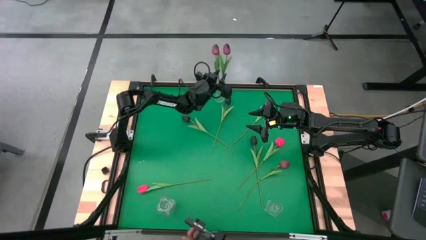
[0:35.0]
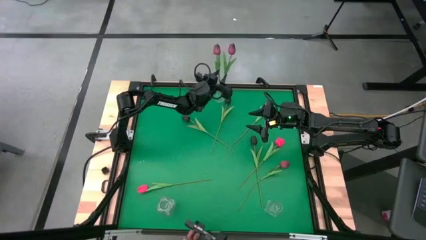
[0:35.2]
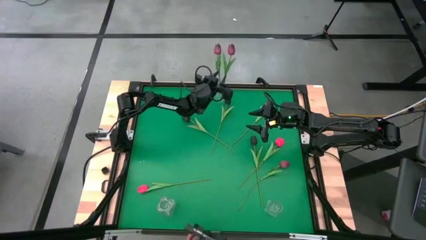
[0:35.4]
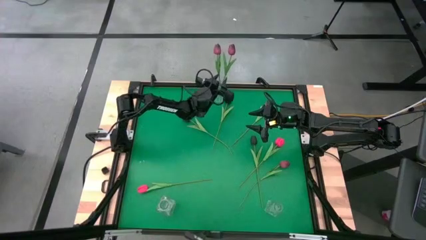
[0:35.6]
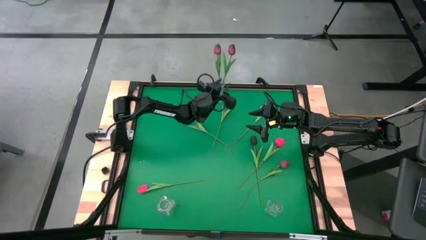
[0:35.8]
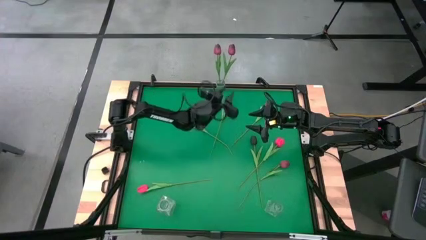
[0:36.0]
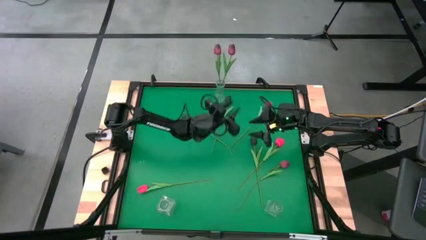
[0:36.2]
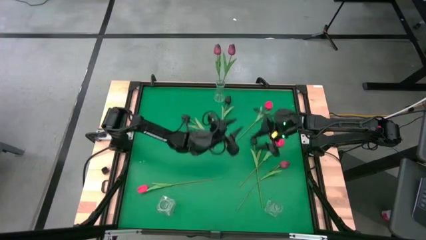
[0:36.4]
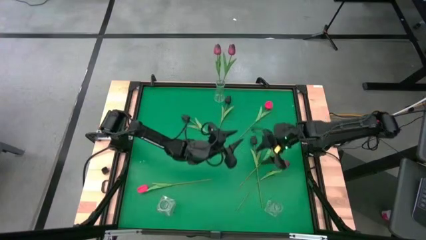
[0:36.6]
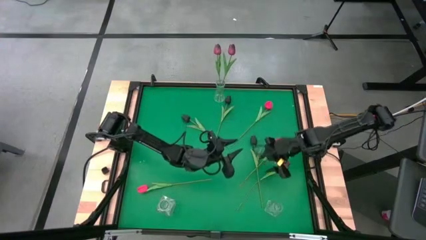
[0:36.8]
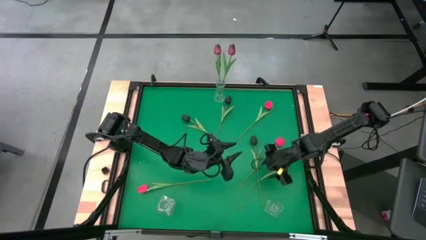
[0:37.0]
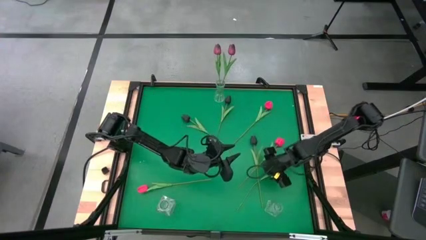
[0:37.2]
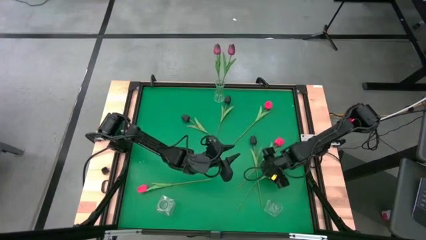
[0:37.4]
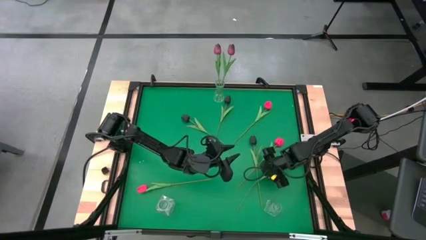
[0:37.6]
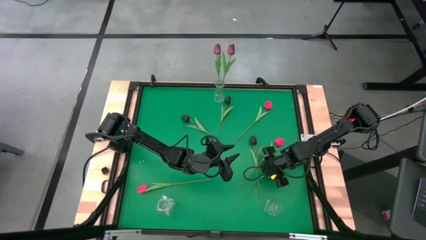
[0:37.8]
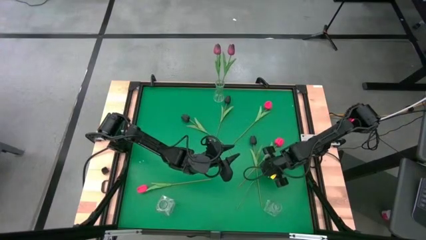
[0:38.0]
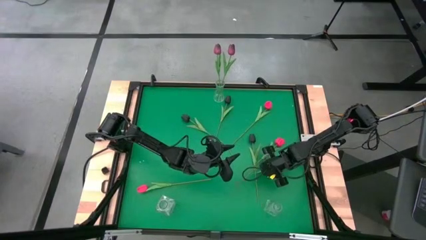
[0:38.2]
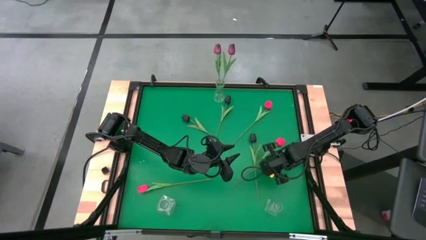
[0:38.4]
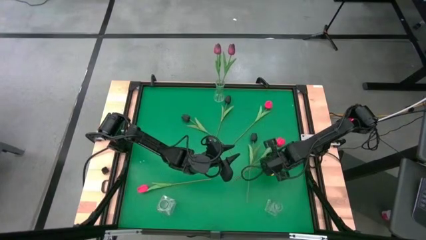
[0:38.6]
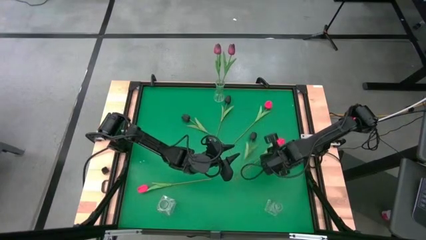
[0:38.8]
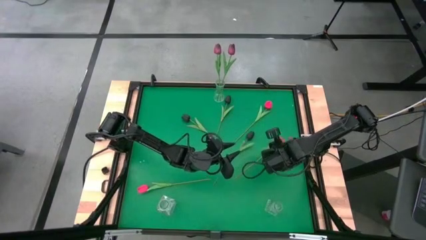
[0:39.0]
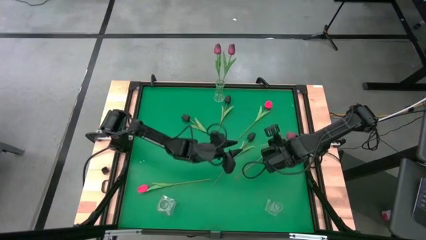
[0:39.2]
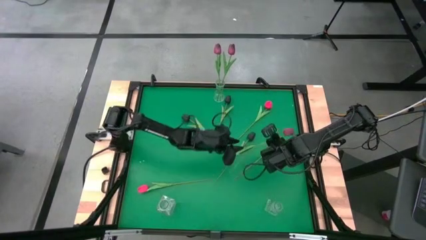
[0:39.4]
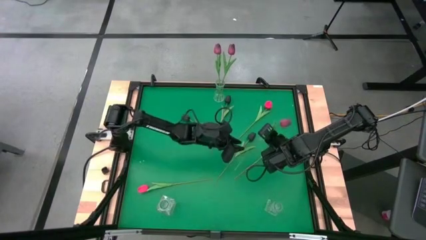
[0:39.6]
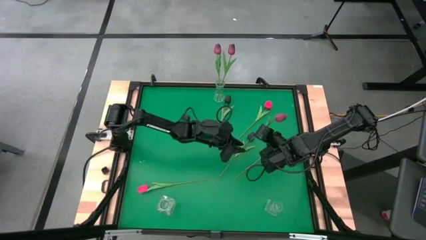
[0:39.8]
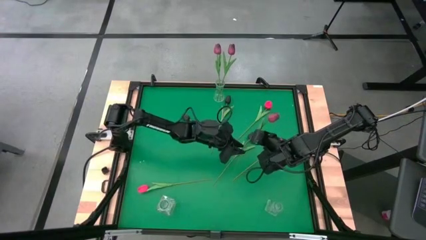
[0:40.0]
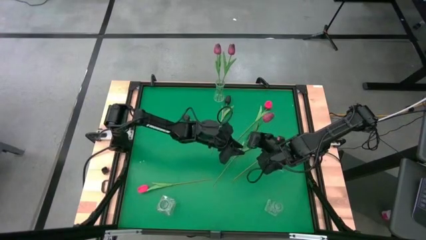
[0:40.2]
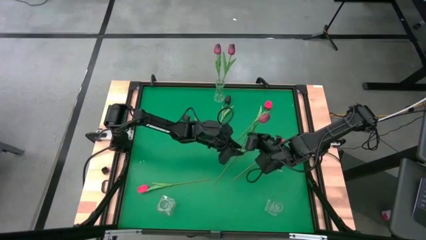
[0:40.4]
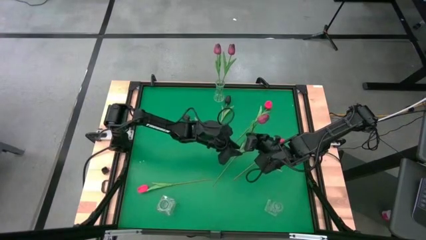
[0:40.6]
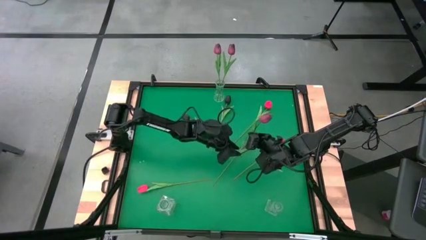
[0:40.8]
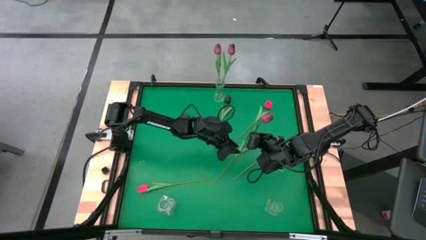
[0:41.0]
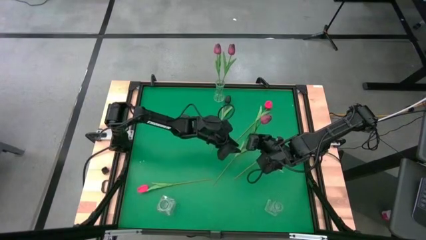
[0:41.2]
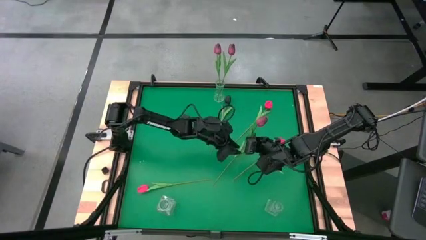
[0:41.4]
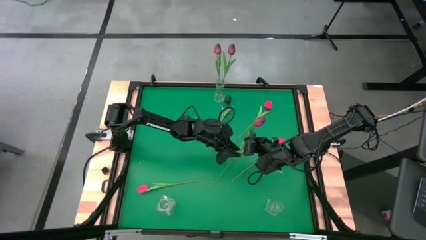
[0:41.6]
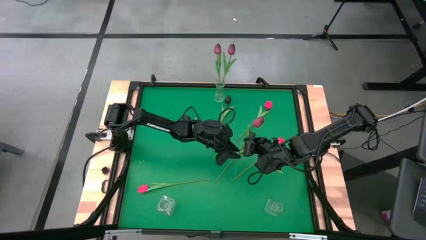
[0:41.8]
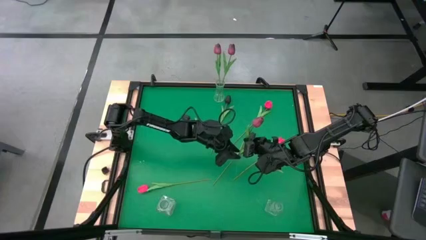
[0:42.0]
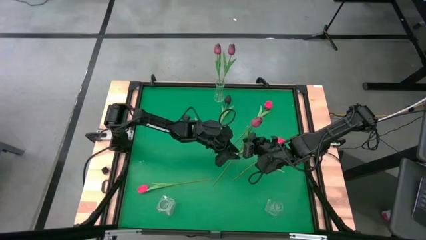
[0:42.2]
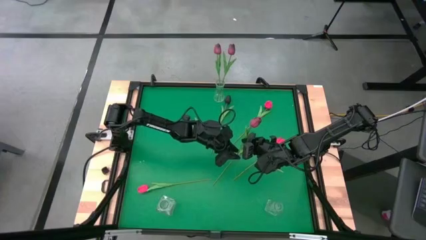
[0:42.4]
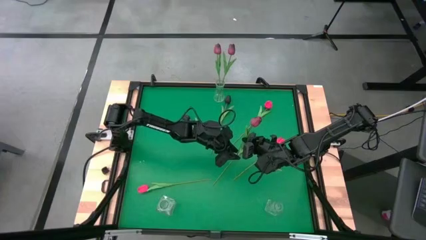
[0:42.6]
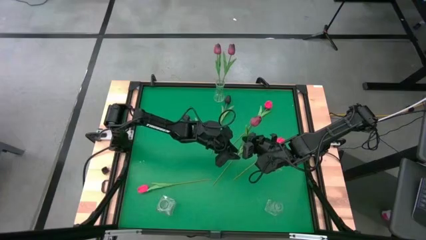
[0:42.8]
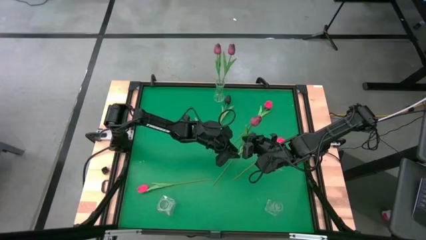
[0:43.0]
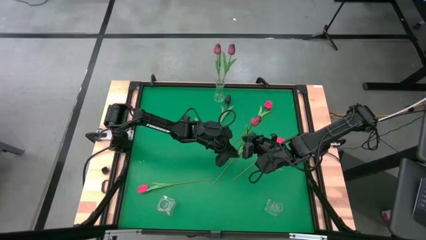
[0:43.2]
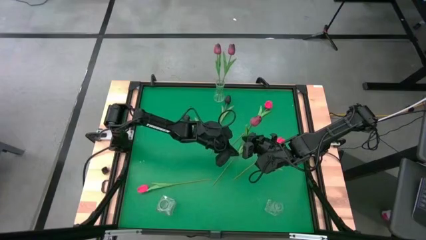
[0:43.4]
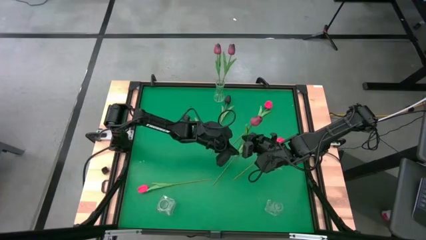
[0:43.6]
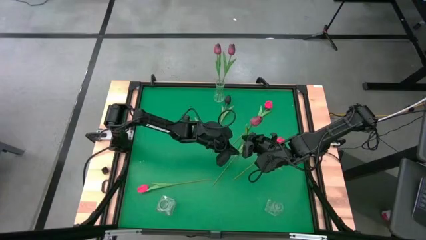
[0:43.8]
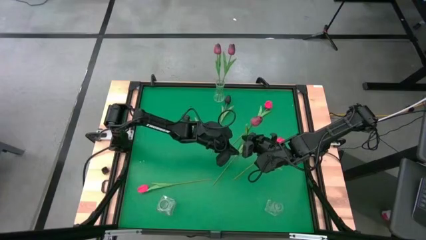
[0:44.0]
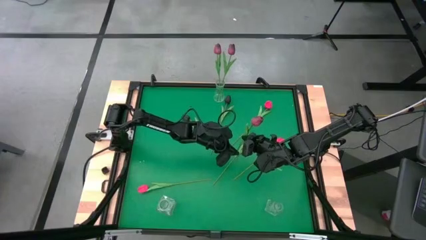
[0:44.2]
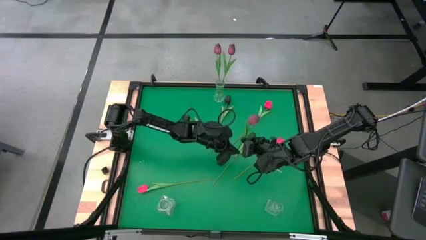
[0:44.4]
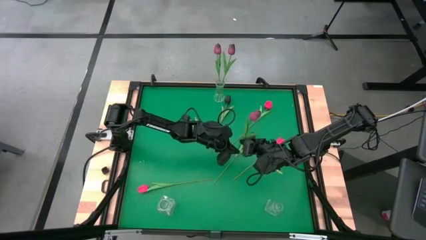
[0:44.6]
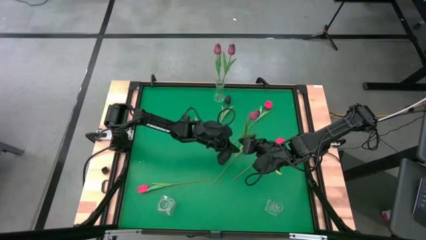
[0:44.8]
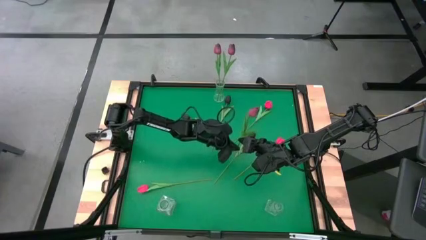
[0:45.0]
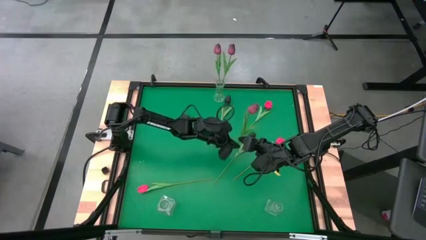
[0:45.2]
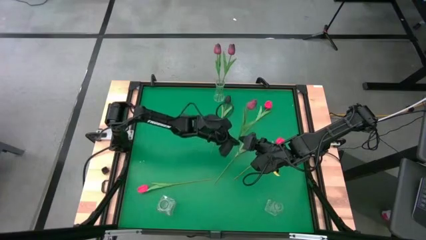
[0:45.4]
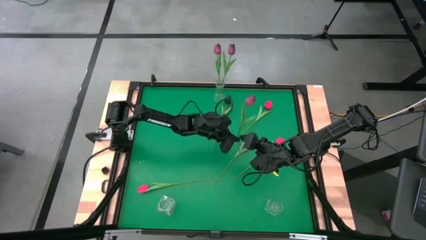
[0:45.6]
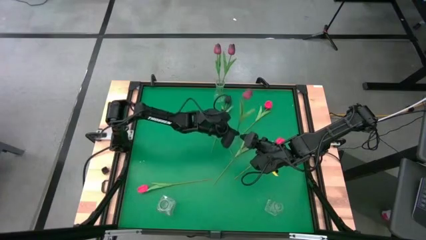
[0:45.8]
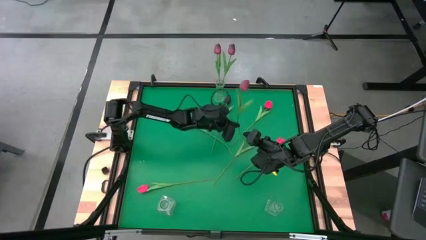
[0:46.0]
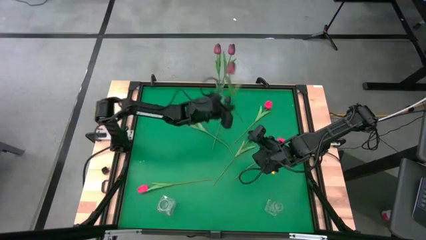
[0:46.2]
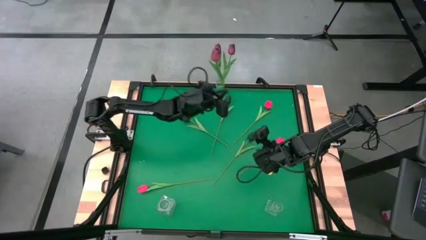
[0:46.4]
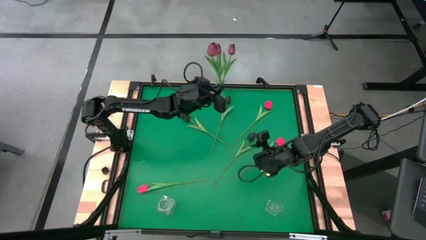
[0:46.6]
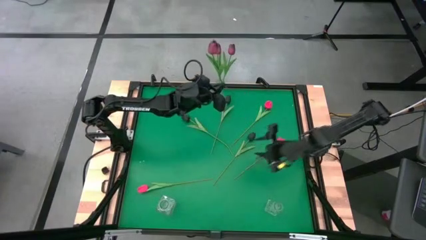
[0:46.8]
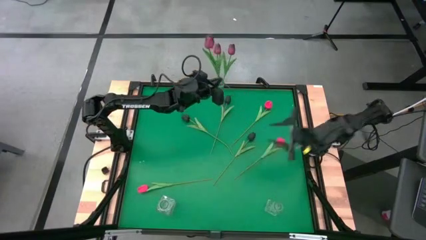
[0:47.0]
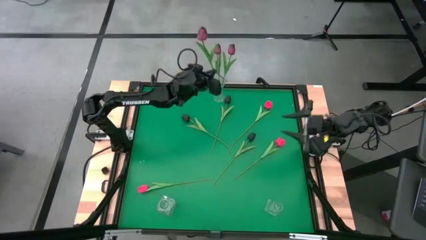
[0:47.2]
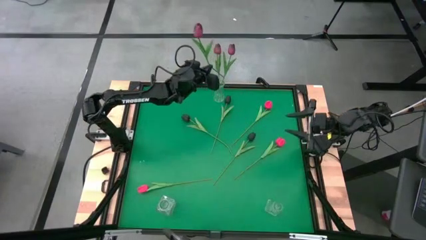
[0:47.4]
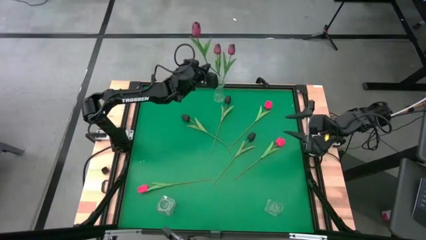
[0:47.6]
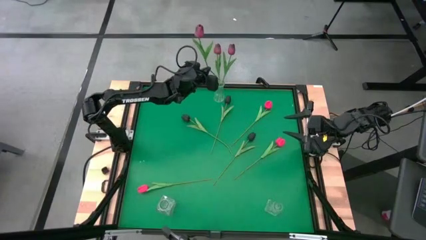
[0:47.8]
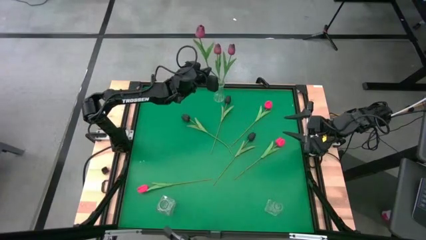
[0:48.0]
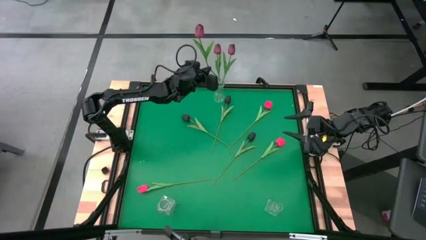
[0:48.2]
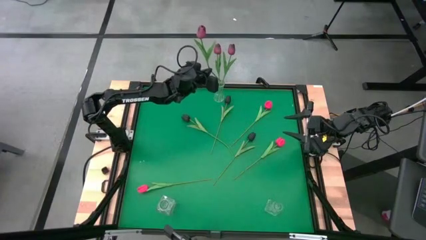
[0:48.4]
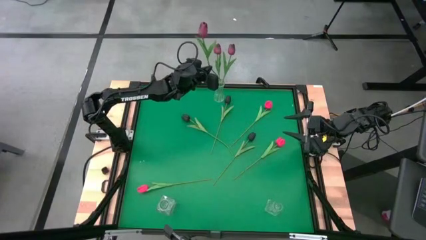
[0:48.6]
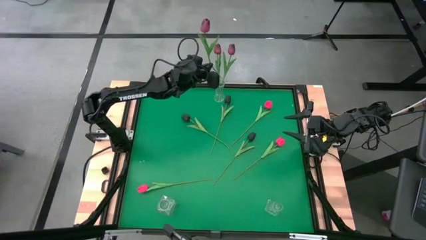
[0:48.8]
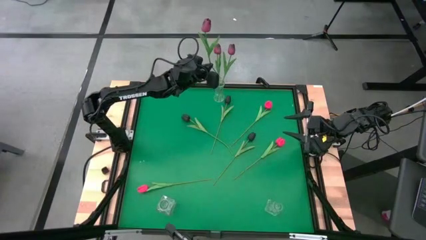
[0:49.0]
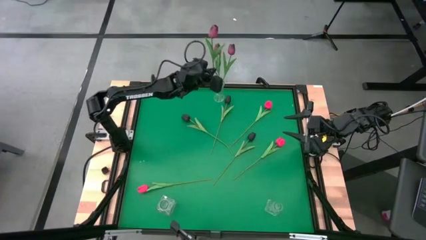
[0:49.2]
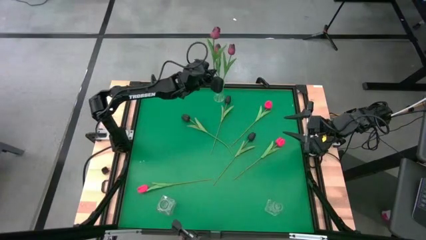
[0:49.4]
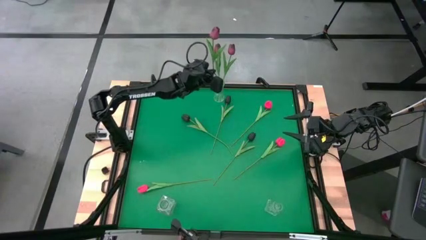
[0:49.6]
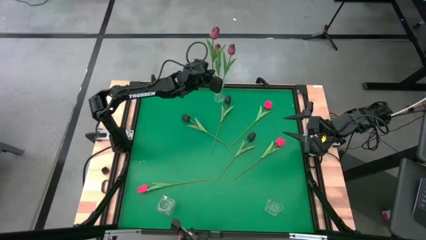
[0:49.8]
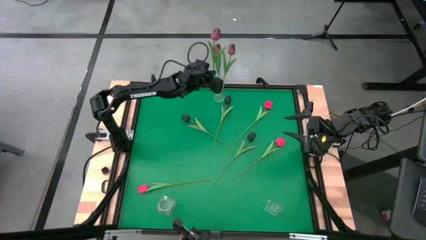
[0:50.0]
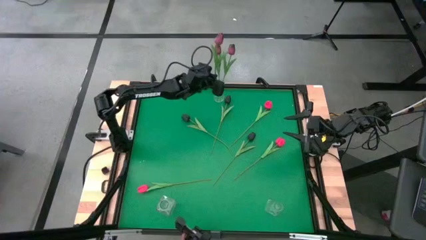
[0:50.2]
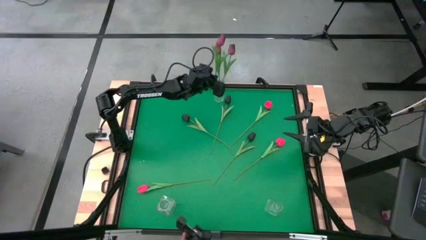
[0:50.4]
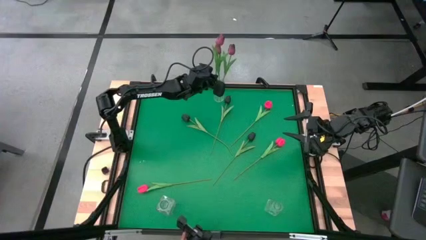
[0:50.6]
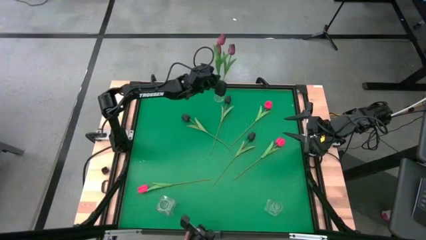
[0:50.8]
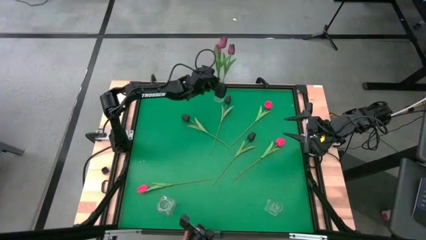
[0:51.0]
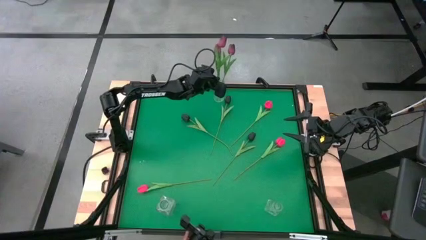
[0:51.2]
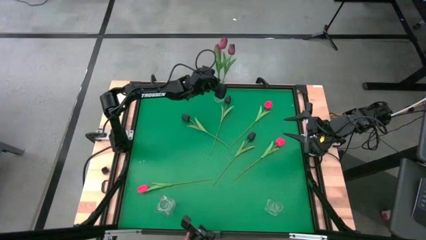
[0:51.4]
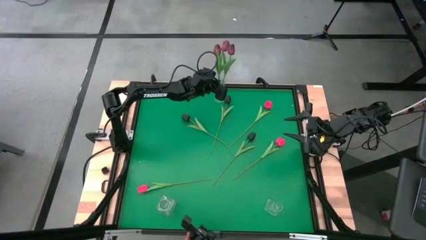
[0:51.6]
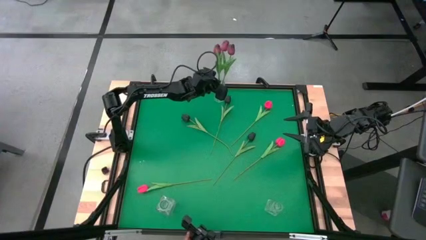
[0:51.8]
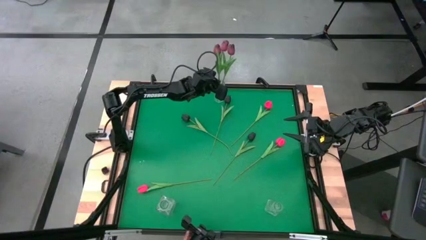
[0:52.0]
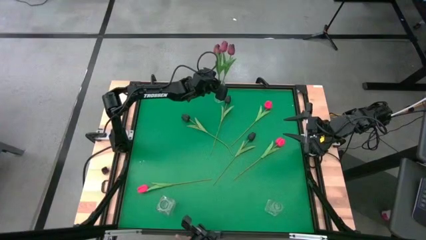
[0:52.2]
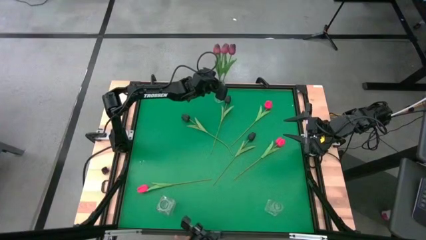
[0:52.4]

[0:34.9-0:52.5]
Task: Sort flowers into vase by color
Put the dark red tulip into the top transparent vase
